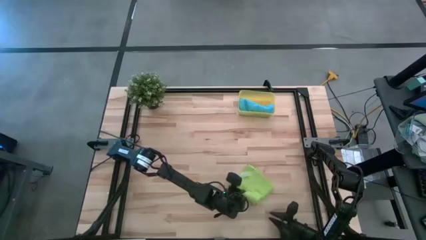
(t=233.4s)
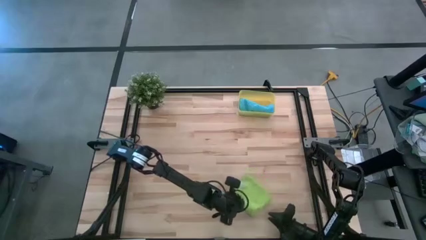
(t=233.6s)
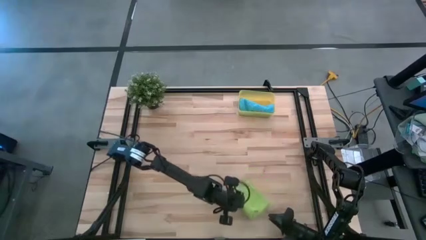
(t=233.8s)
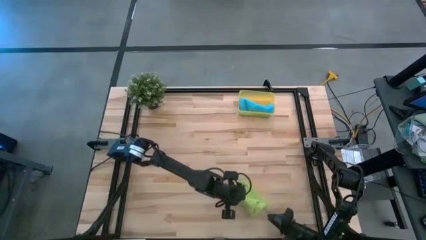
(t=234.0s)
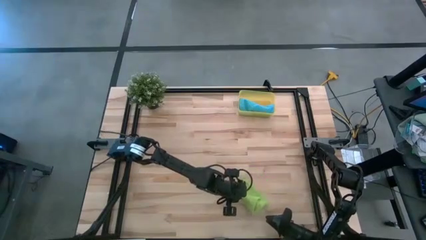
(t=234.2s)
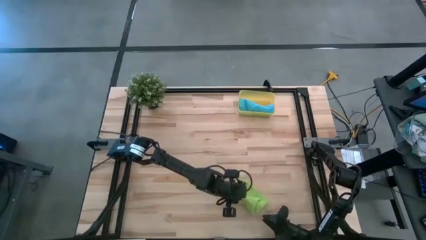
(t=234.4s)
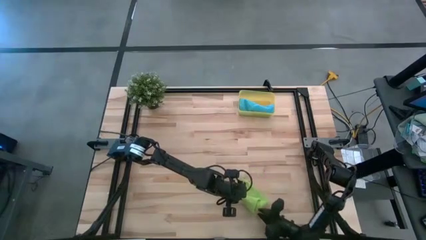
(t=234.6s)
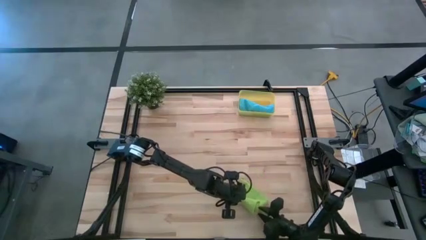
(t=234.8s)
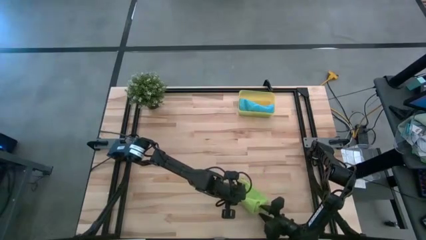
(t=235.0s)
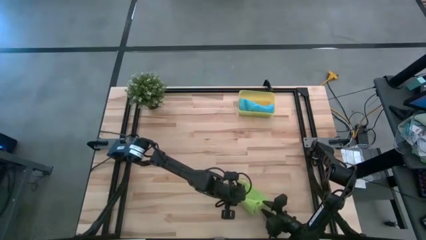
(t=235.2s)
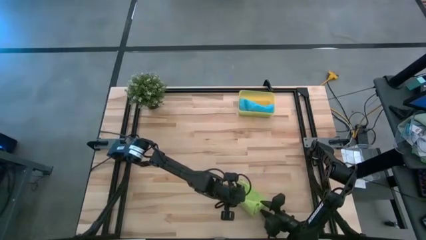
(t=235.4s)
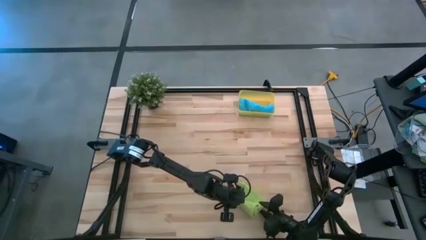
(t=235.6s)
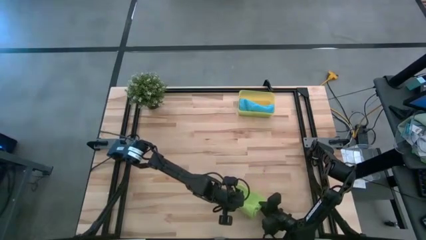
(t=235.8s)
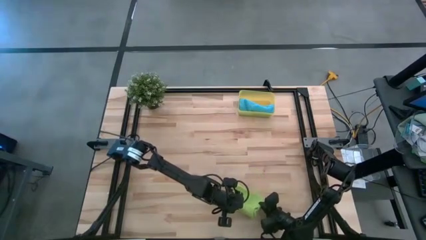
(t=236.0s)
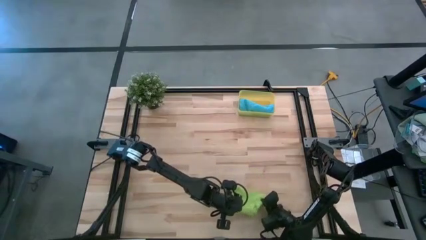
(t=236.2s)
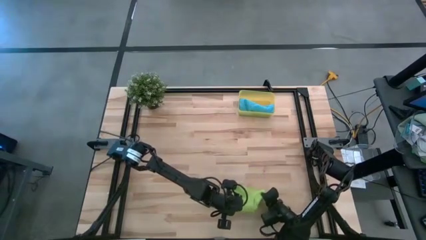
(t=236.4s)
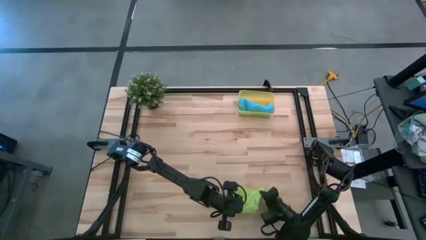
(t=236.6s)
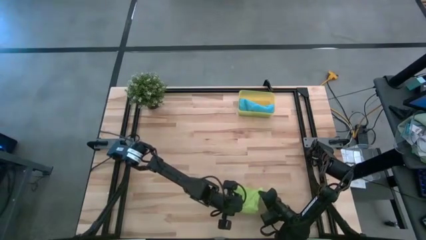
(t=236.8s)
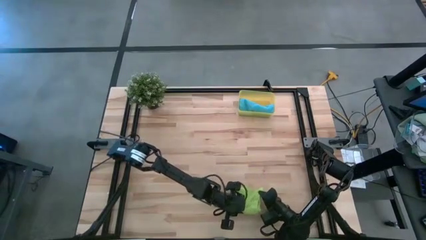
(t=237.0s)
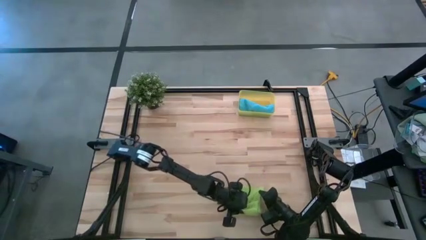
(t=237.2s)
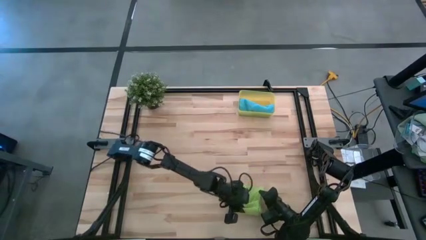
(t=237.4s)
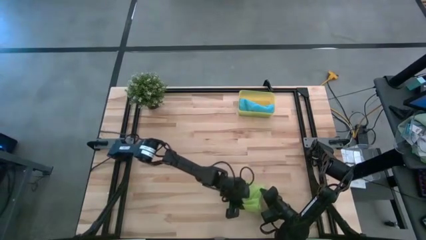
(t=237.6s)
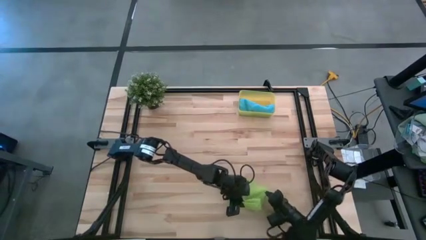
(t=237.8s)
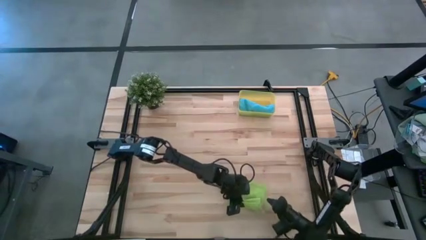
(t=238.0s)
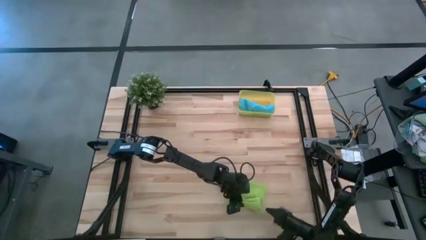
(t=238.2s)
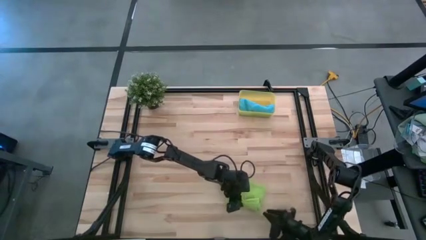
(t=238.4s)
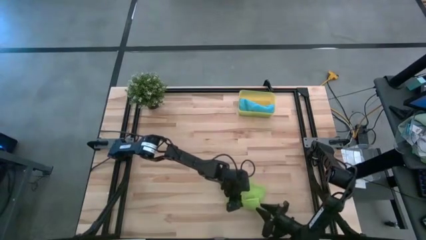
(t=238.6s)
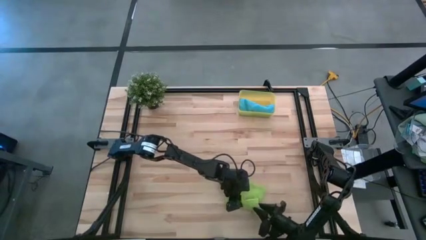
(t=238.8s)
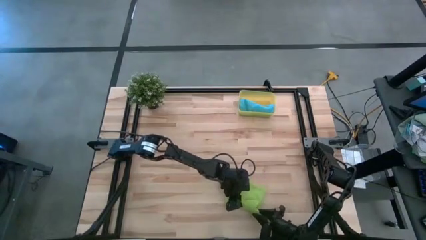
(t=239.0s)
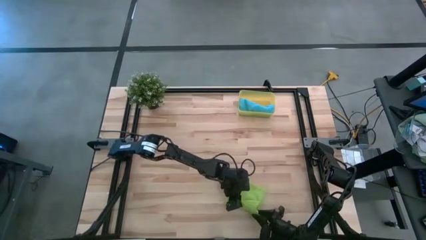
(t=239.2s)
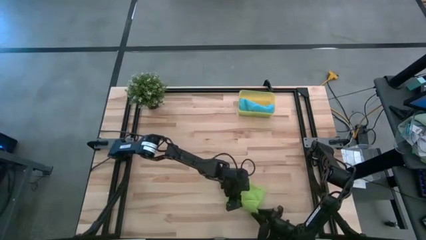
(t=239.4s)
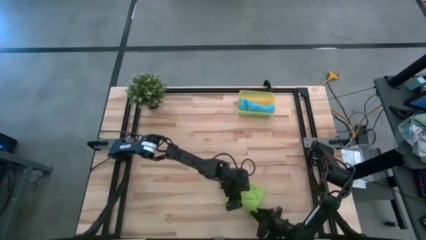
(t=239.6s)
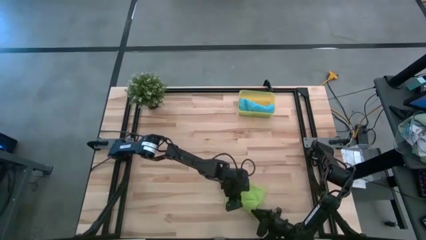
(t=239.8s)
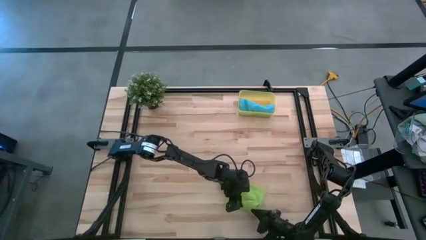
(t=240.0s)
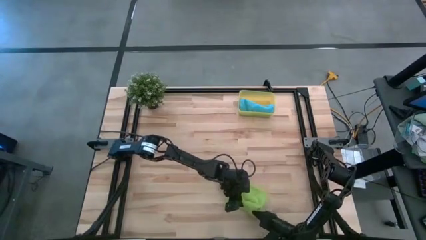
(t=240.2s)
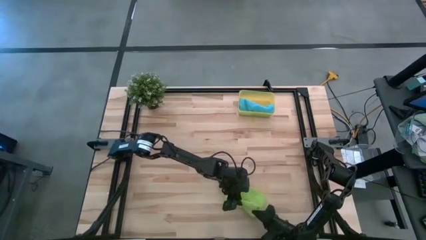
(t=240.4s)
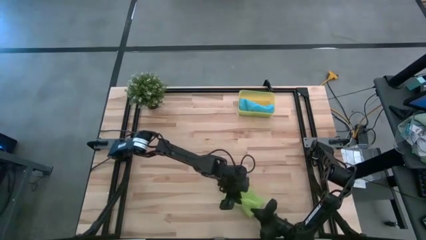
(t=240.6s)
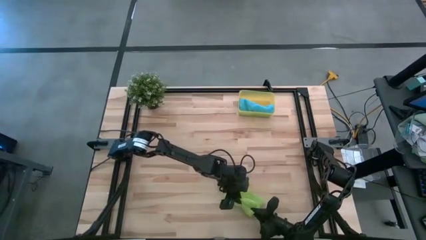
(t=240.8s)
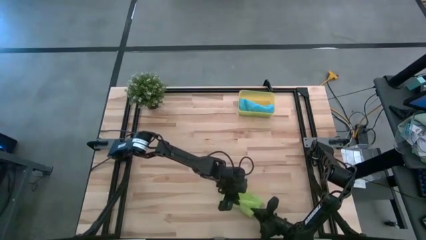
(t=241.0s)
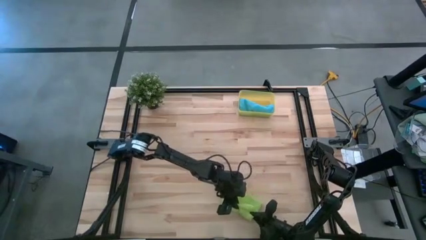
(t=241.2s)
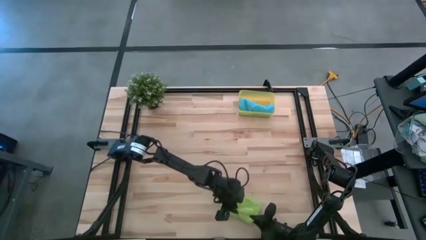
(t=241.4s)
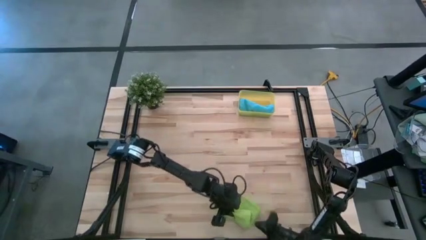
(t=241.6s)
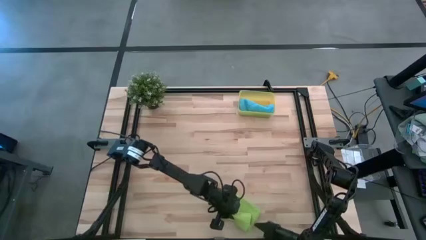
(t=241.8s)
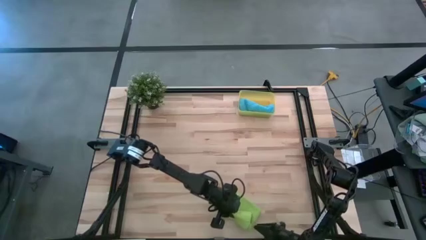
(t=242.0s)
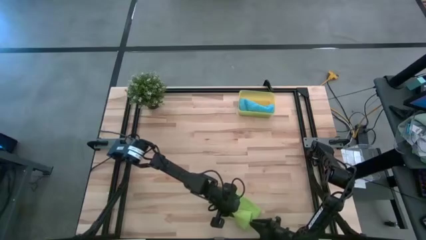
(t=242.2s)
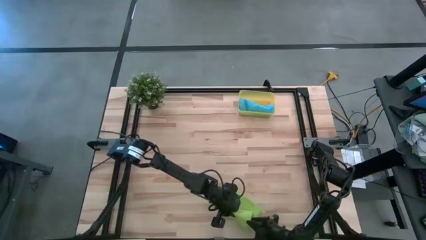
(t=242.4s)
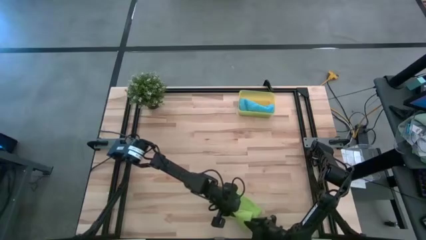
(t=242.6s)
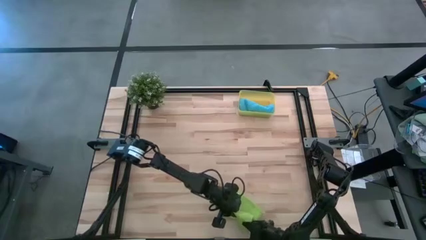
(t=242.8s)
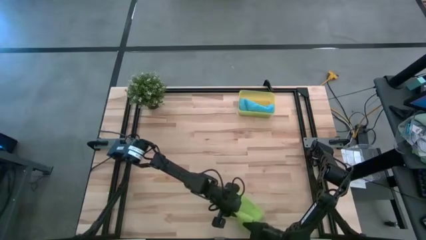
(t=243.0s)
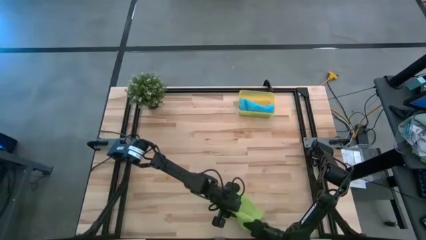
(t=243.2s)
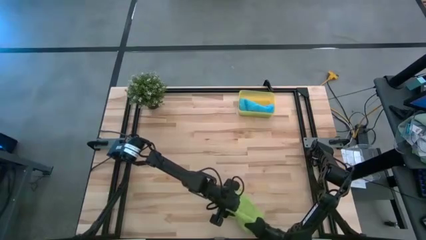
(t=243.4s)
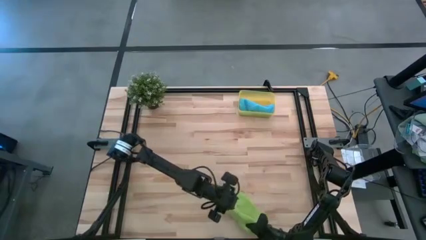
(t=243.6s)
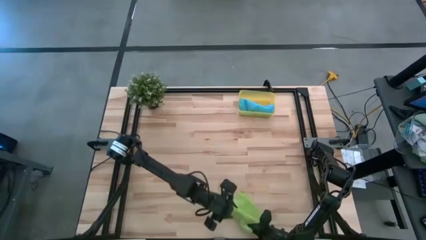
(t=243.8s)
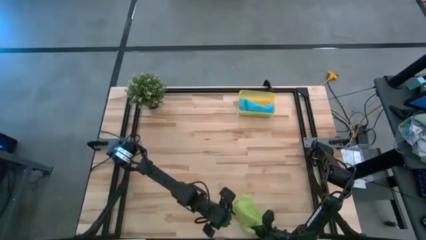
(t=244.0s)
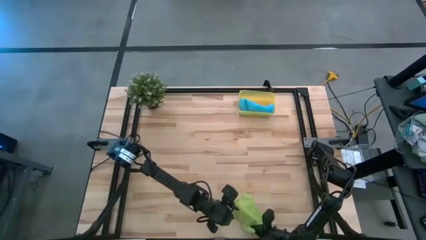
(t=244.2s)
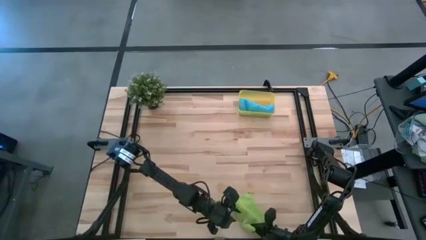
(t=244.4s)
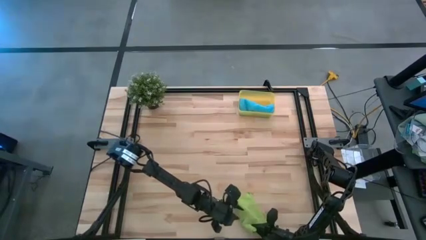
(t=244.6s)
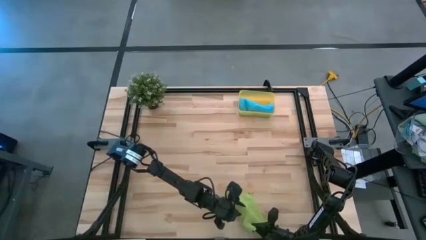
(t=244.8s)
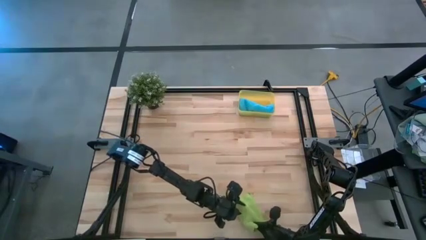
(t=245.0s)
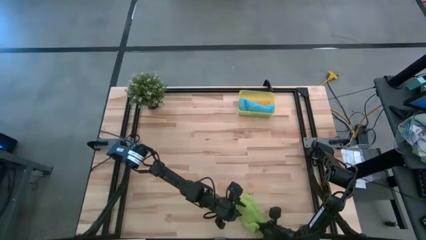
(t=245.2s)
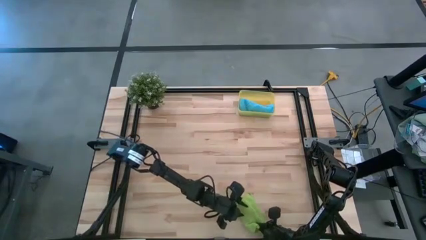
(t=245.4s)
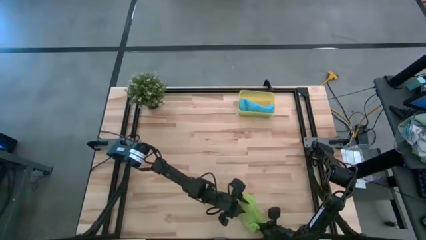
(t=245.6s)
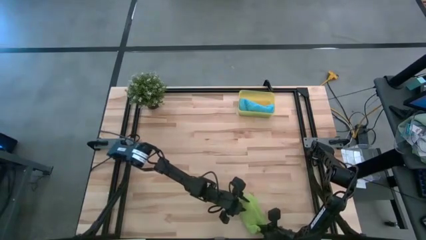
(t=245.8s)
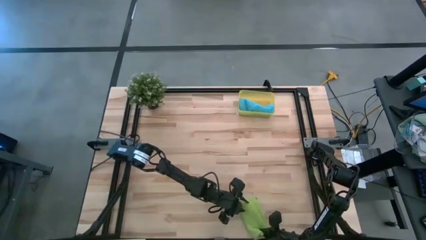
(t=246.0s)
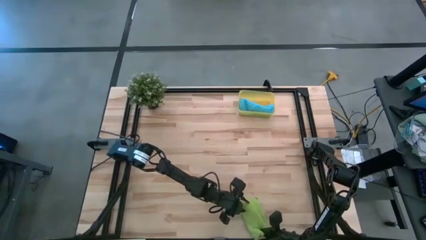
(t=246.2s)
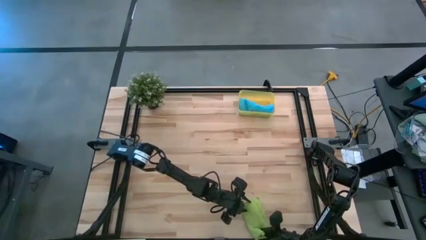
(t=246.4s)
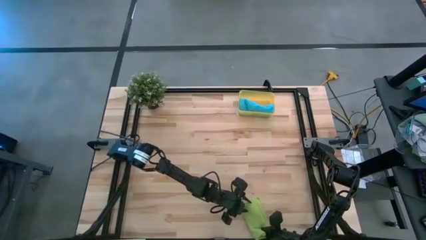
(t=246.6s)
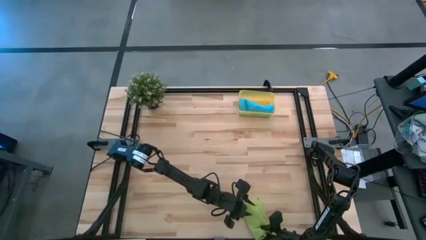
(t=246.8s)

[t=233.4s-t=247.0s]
Task: Roll microfiber towels into tight, uniform cylinder then place into a basket
Roll the green microfiber towel
